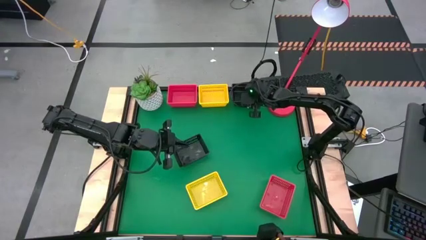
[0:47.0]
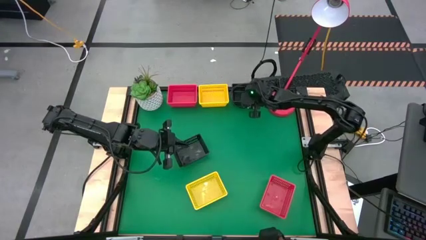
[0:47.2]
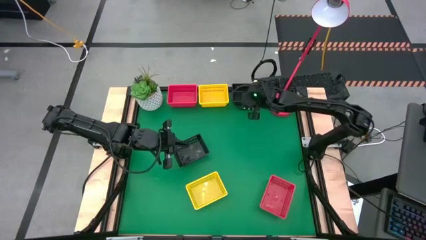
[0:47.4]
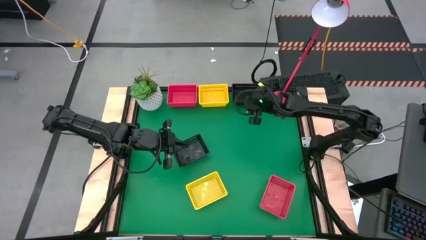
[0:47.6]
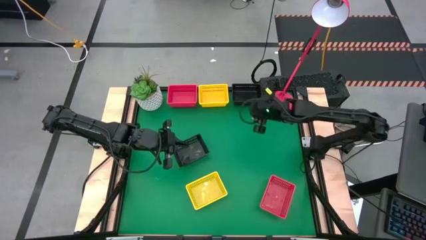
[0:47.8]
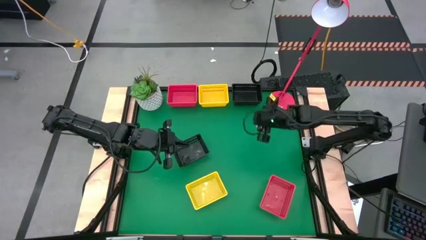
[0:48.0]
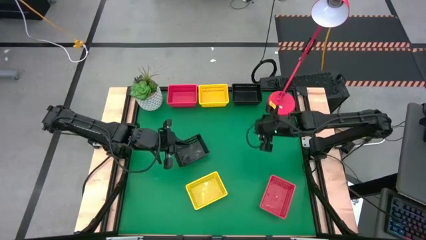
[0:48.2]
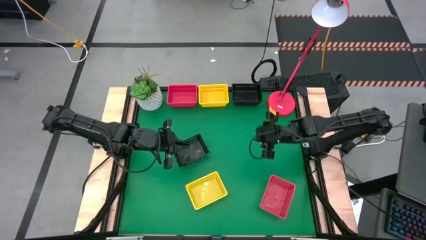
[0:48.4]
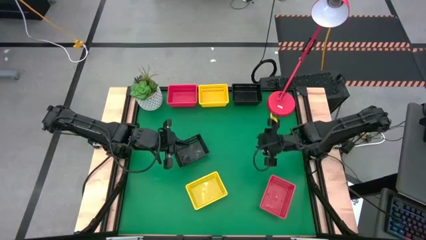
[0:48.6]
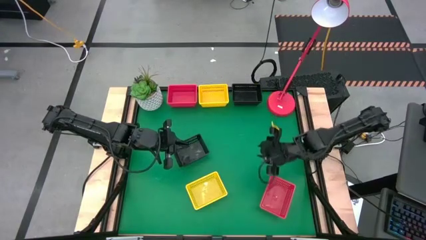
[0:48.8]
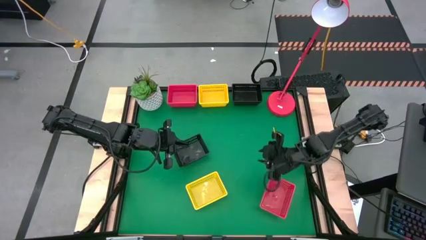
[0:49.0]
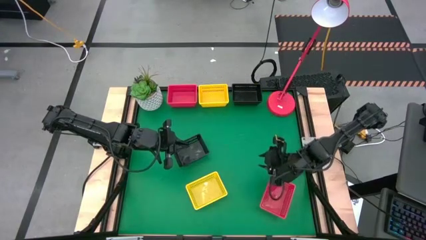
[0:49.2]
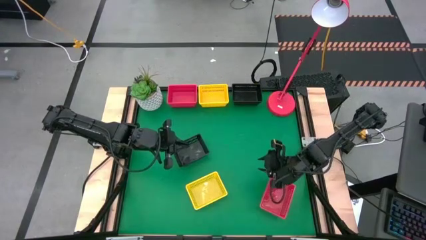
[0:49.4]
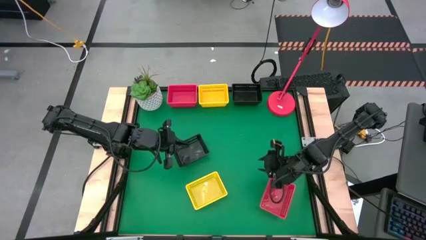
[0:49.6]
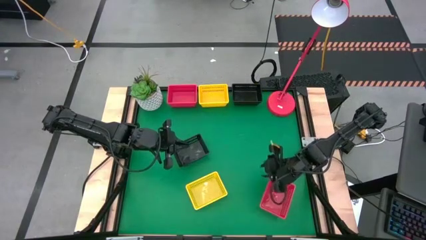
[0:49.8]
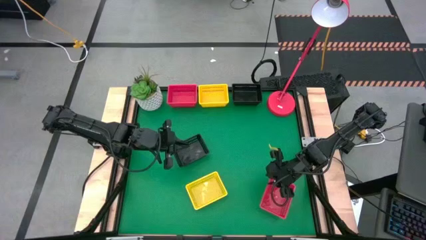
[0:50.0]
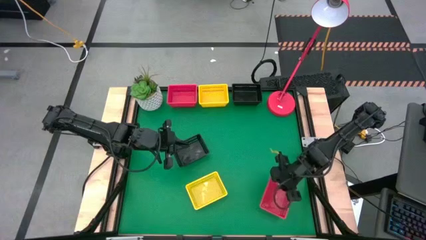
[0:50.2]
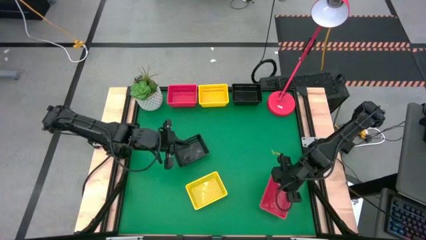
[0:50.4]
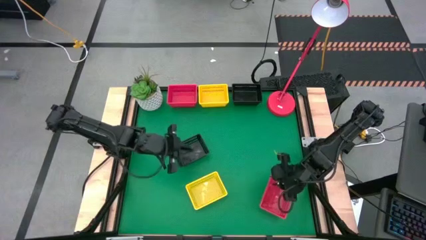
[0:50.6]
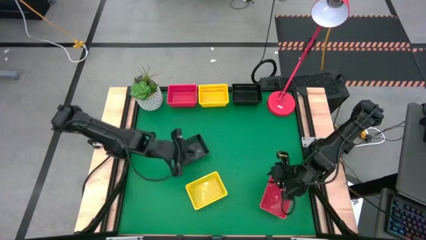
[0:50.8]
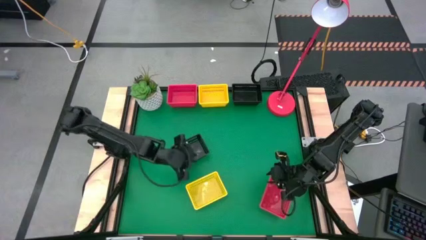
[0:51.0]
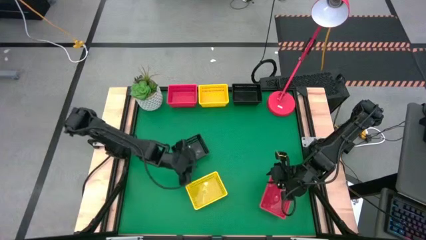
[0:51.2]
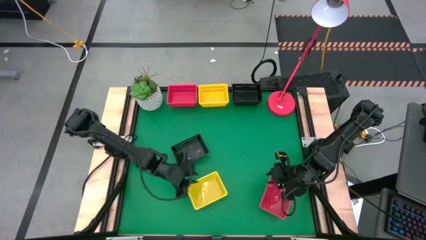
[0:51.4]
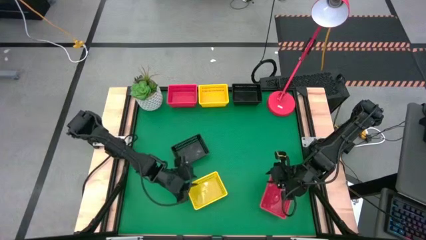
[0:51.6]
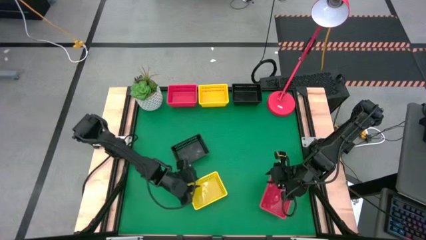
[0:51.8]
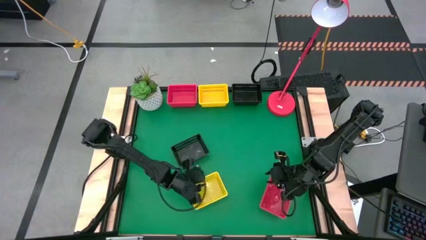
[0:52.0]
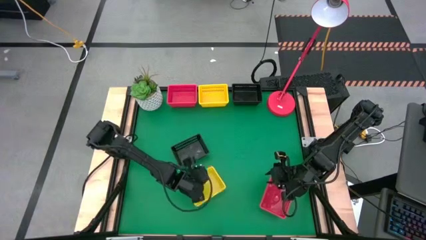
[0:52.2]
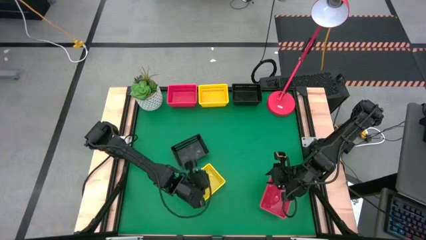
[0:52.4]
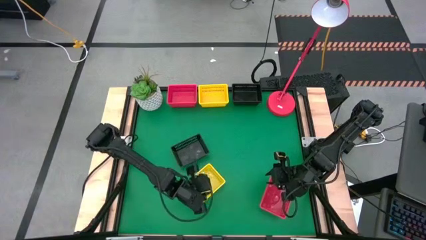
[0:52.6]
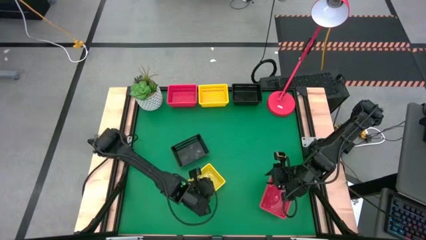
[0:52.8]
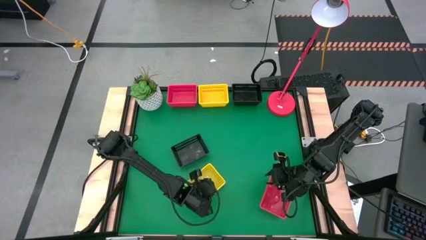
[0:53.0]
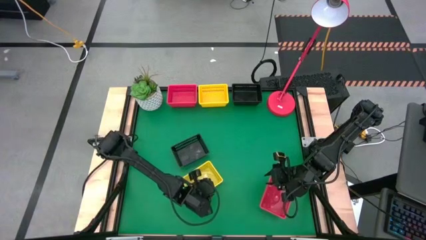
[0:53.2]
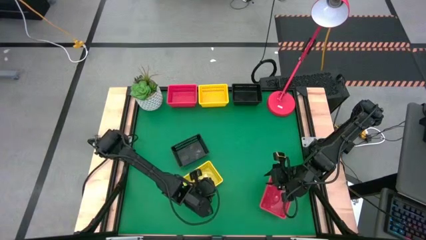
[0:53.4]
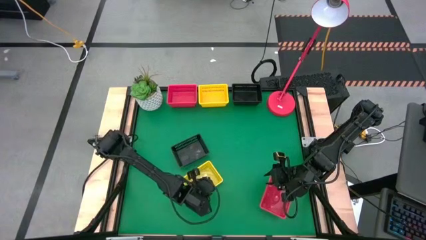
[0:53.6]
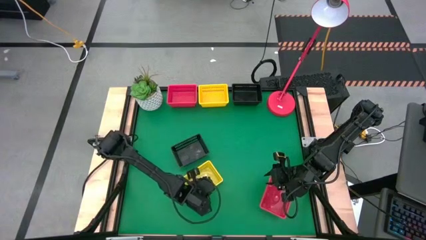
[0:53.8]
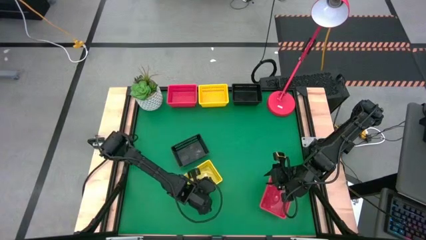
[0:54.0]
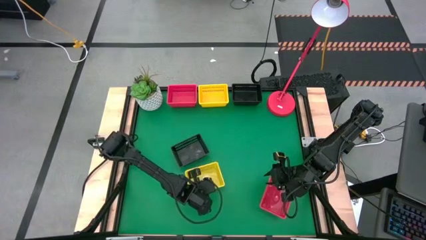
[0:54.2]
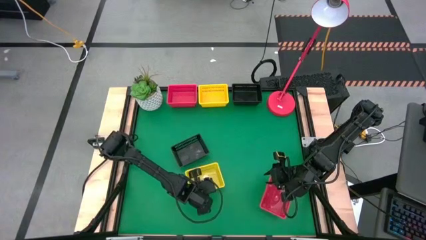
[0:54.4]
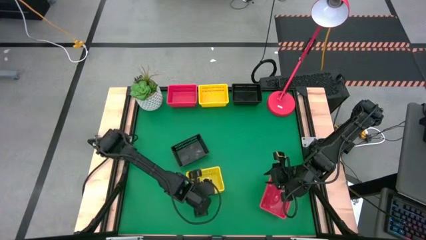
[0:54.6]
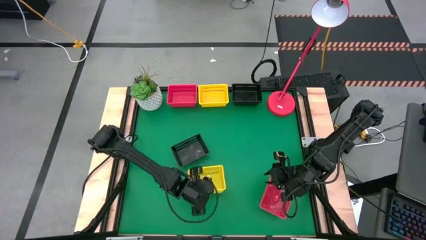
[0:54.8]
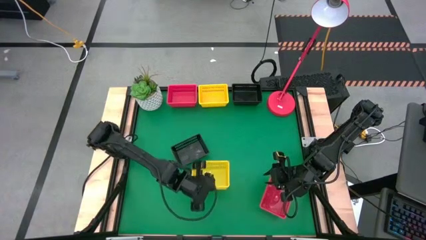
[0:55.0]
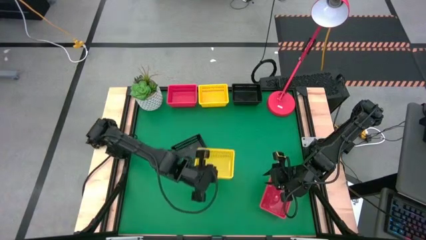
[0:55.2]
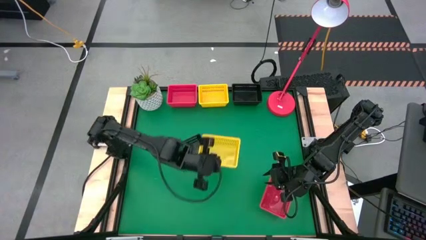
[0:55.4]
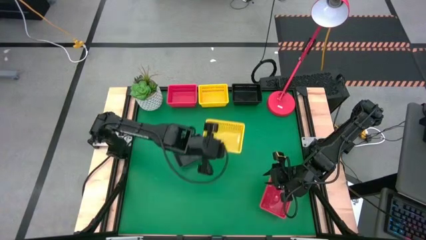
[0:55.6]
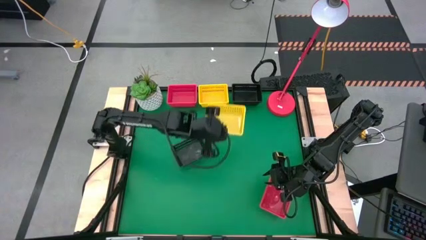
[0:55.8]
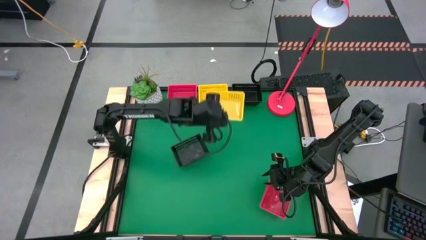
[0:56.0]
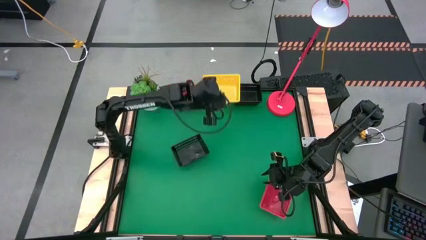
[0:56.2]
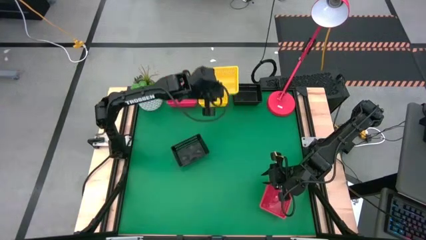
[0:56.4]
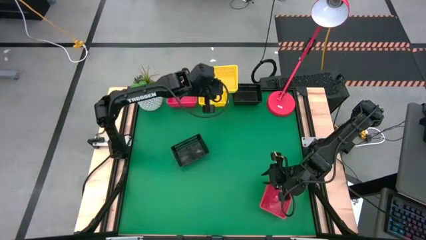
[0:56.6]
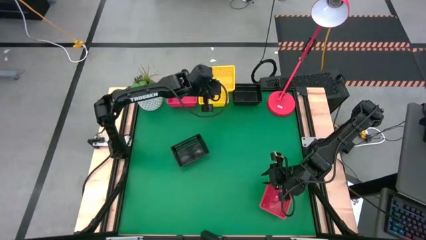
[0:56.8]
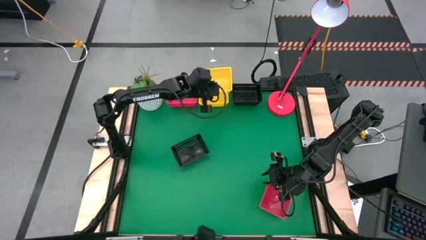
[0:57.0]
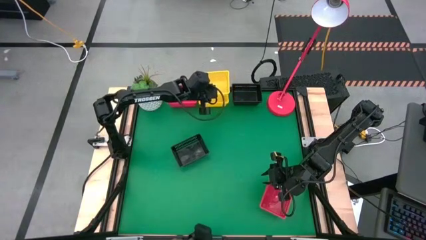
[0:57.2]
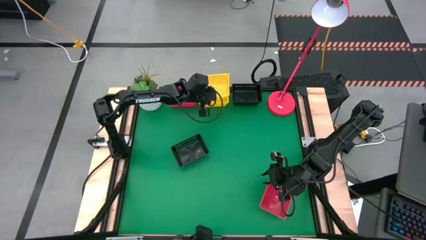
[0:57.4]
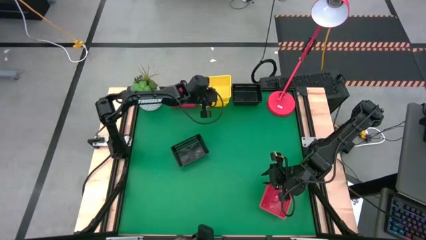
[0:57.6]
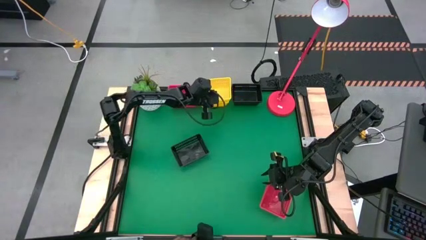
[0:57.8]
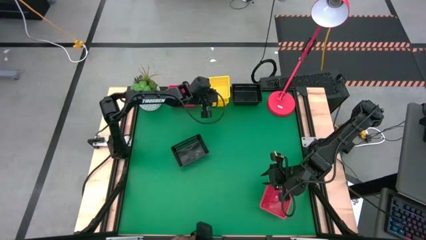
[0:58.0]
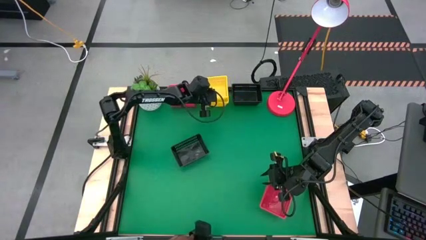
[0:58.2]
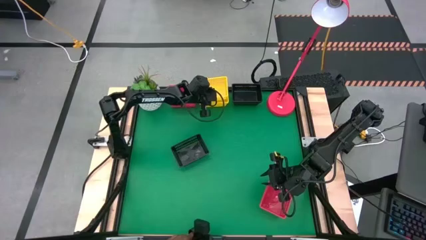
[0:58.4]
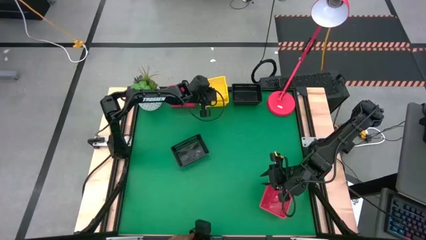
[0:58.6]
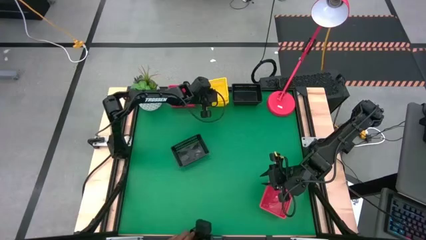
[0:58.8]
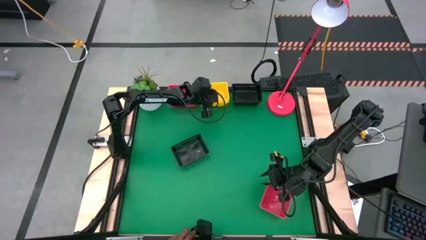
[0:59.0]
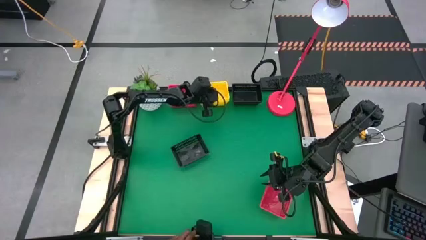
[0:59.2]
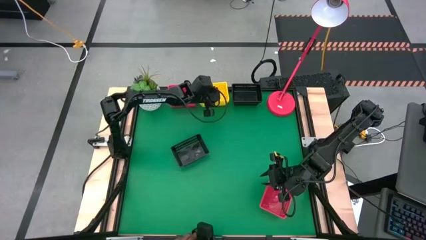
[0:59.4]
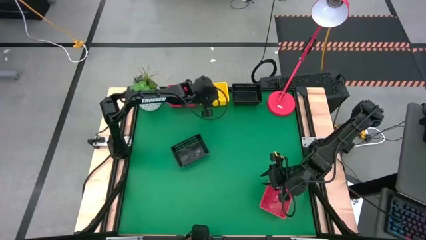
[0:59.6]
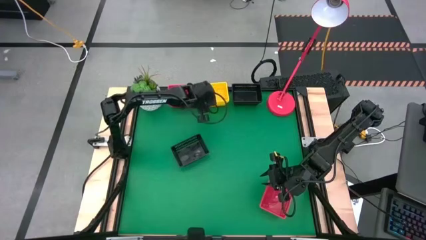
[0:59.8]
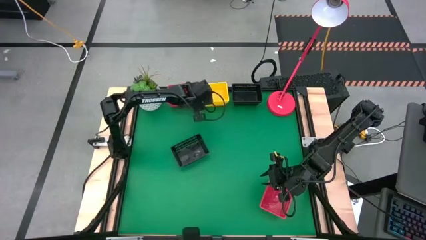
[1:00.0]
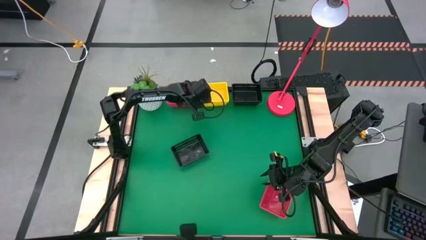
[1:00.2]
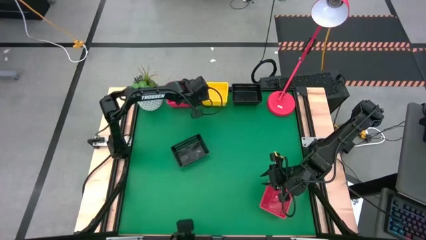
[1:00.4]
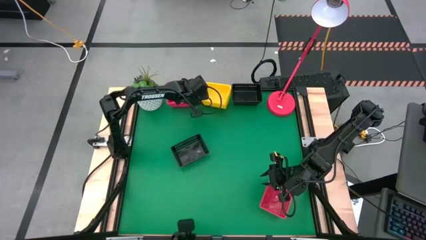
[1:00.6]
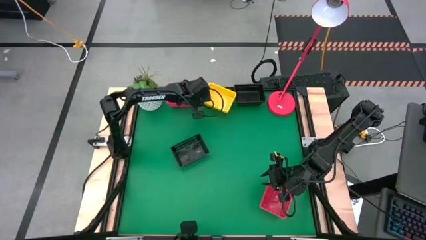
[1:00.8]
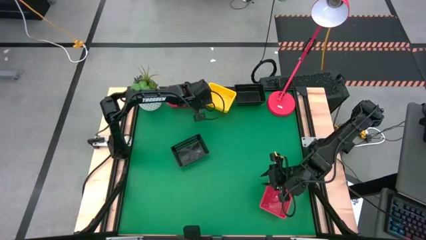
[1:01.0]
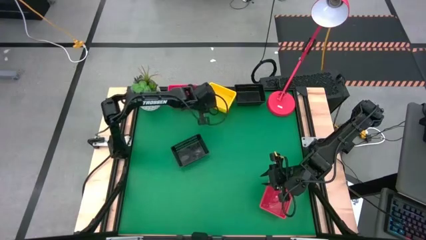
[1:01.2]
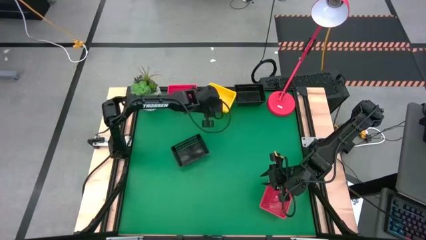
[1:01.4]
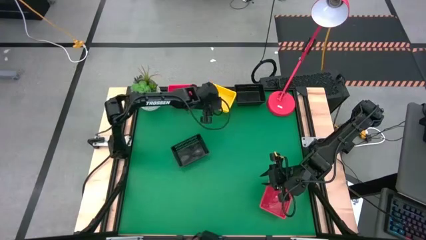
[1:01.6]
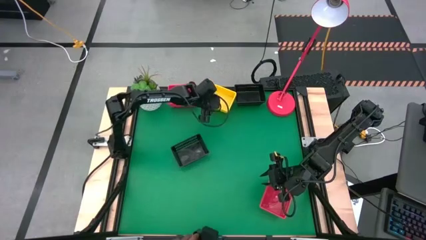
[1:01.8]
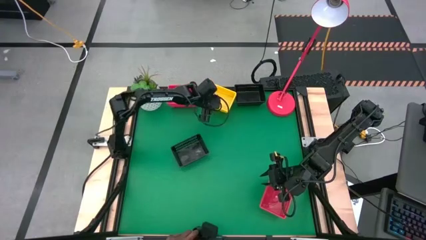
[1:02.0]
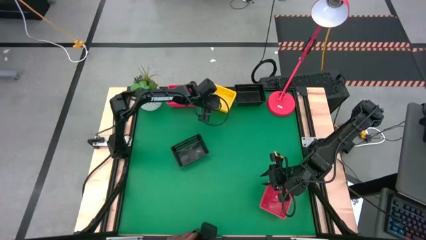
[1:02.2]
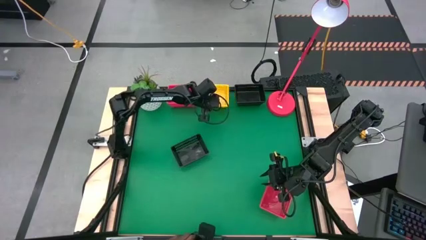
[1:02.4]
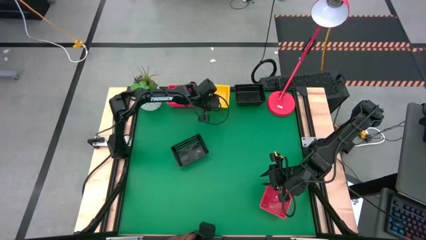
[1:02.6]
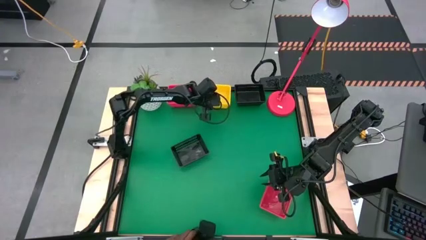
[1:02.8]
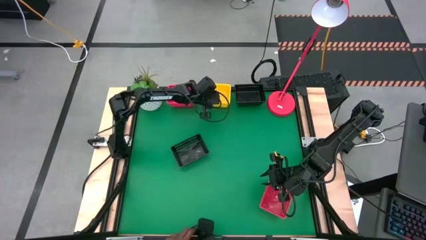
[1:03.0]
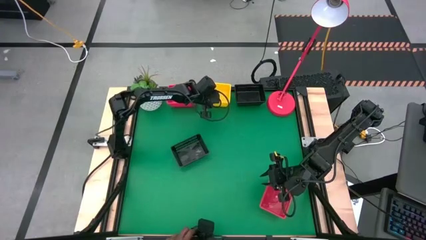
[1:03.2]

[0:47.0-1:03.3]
Stack the yellow basket on the stacked yellow baskets
